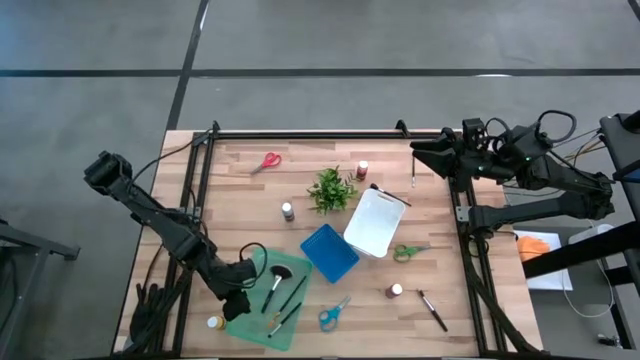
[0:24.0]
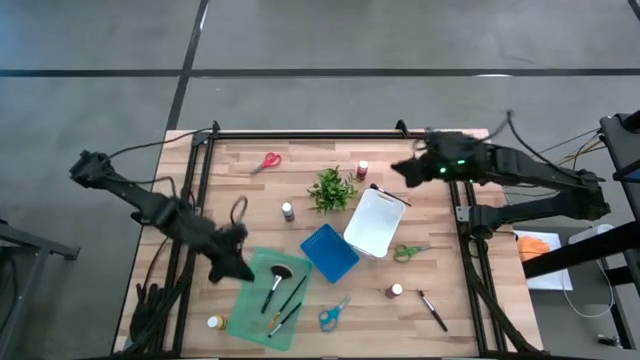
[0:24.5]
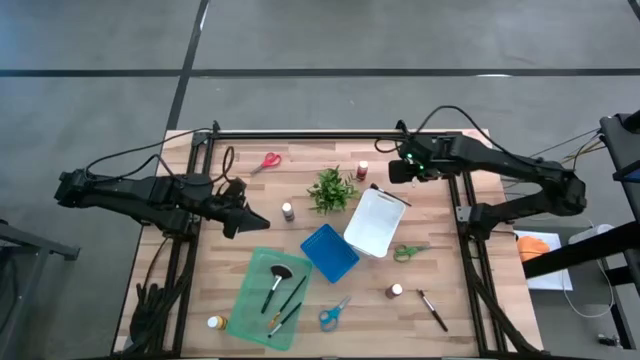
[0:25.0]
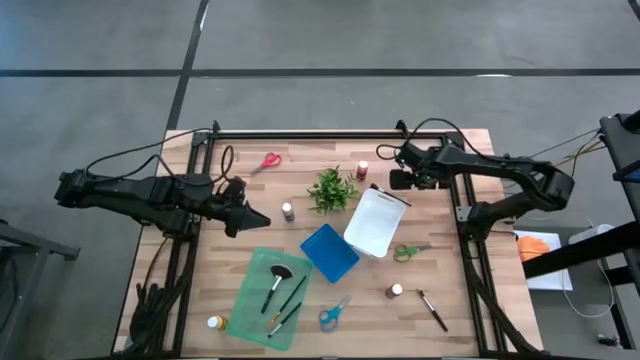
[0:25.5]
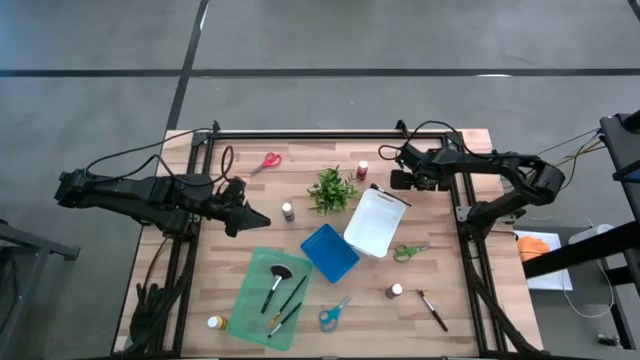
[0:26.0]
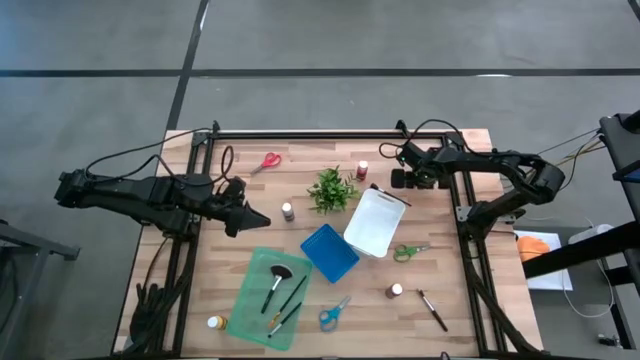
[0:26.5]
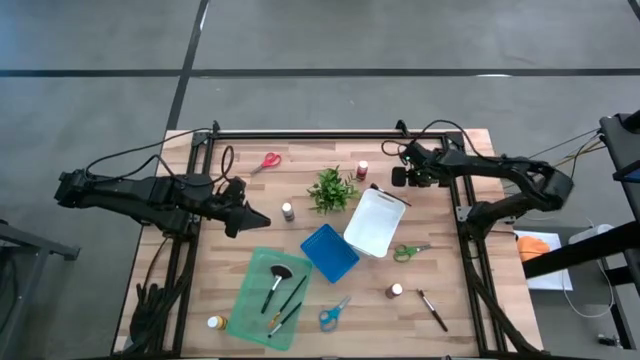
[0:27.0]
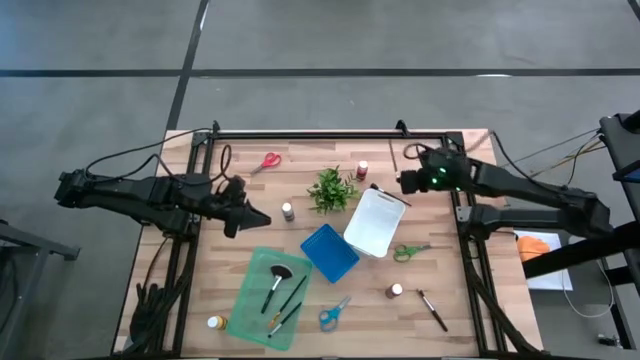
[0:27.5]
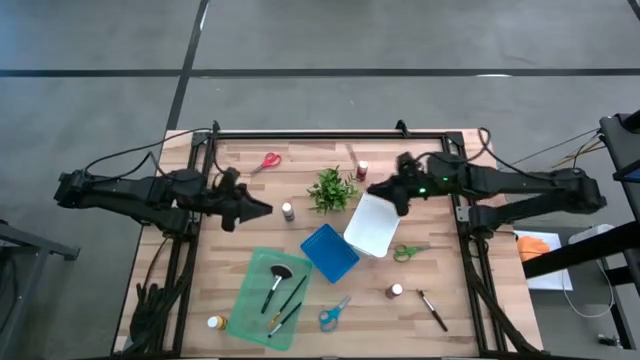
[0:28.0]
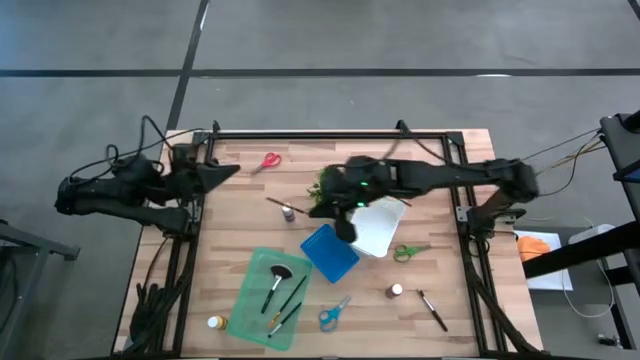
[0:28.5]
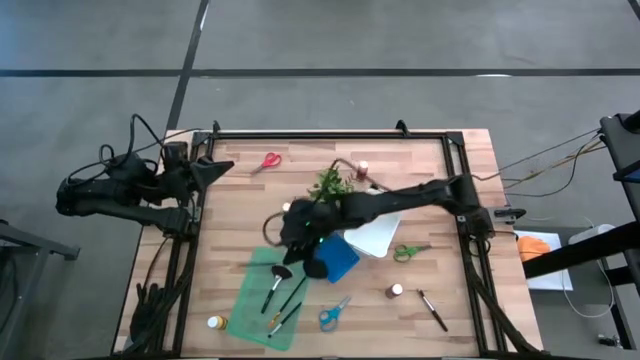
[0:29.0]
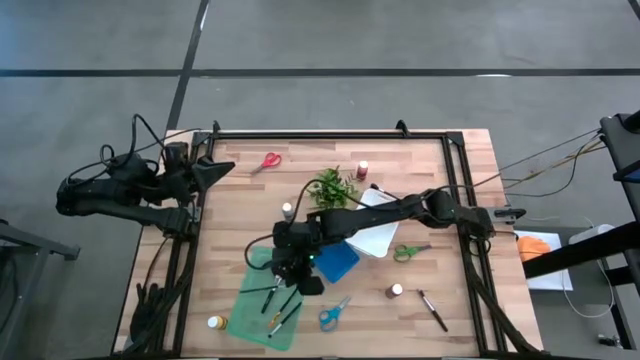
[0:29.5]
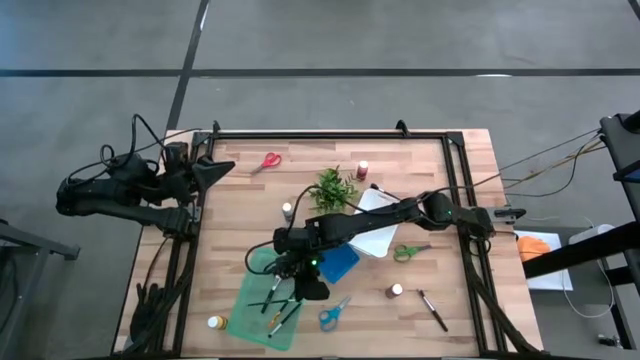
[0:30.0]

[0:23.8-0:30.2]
Task: Pick & Place Paint Supplies
Put the black eyeshadow brush into the green bin

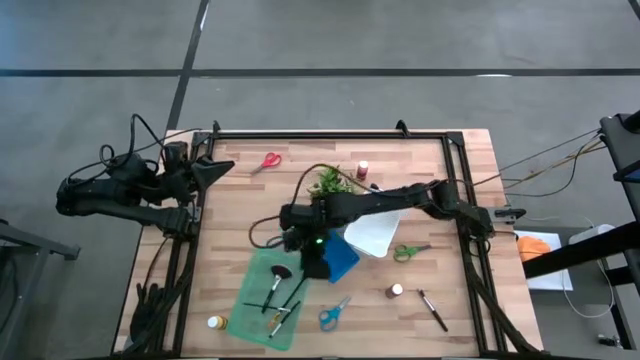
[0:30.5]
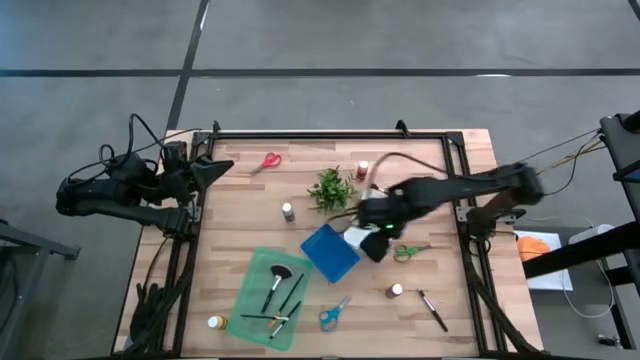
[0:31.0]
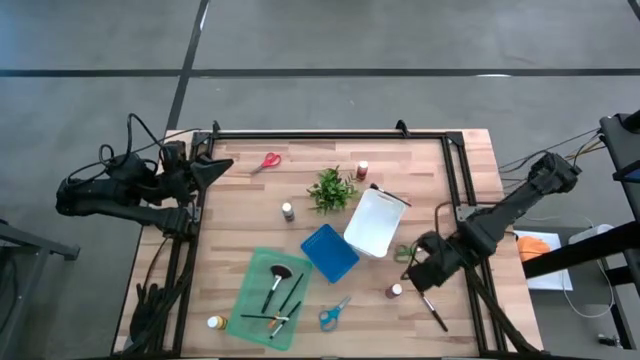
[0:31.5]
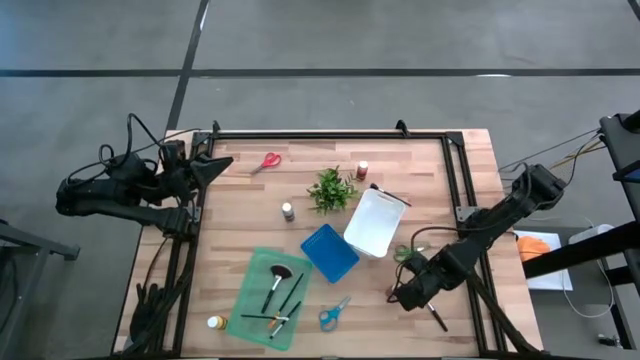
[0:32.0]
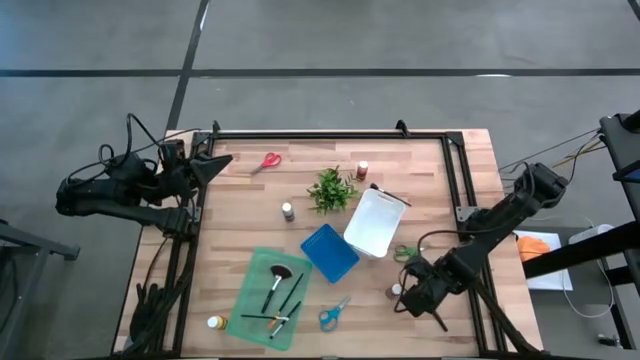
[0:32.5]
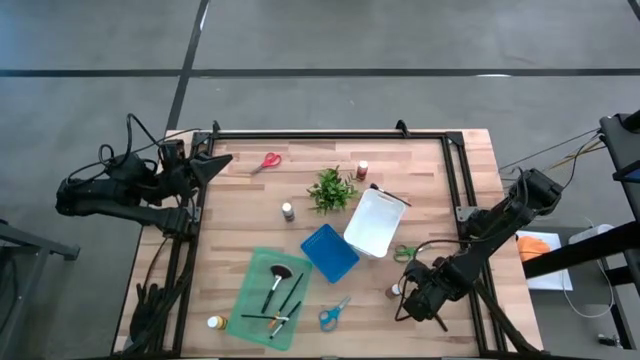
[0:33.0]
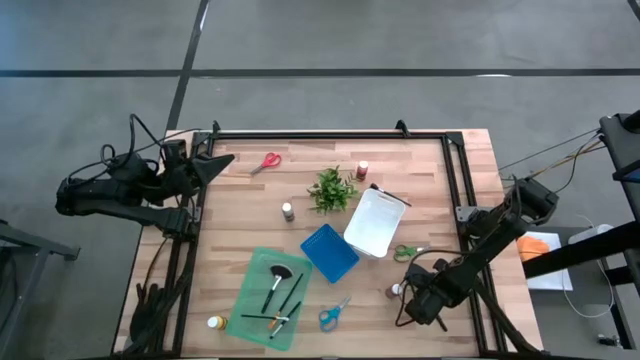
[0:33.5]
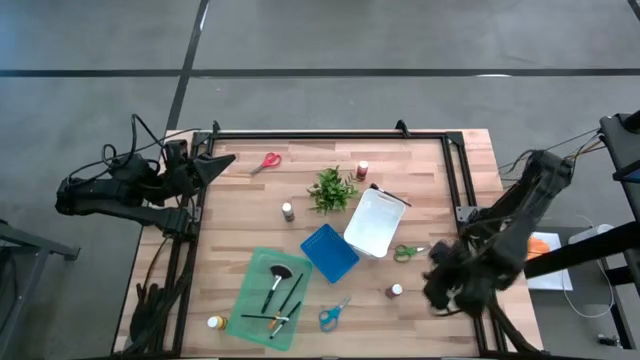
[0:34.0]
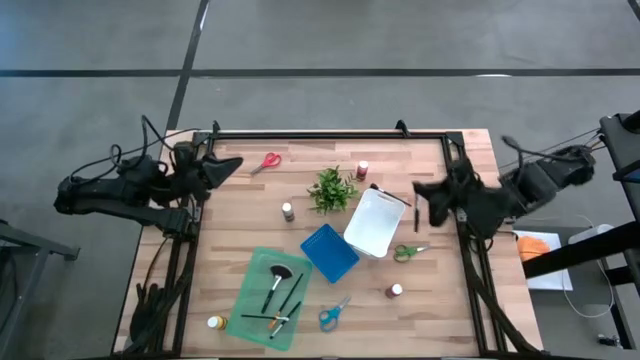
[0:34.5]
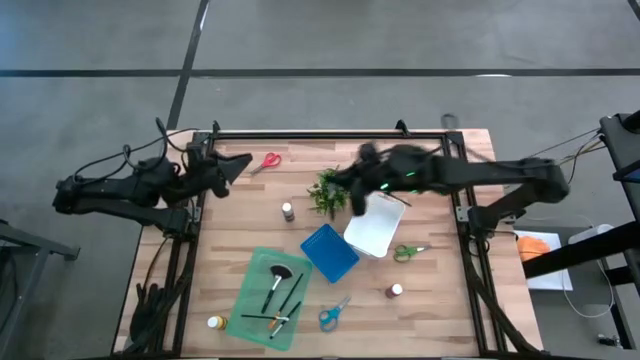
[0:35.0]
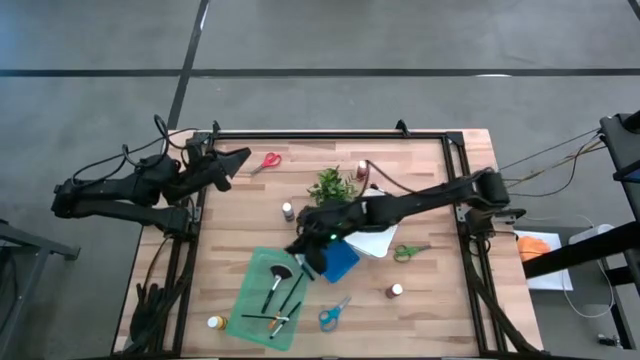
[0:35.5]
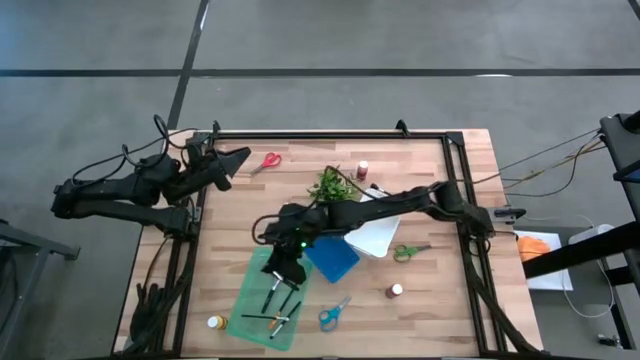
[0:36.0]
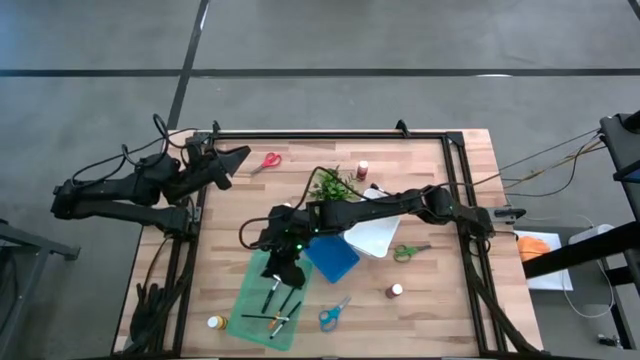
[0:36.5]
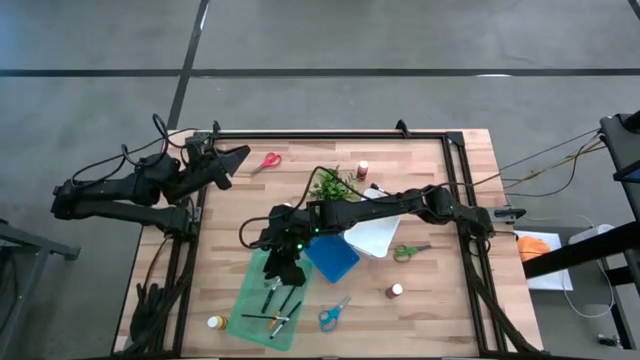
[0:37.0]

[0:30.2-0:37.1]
Put the black powder brush into the green bin

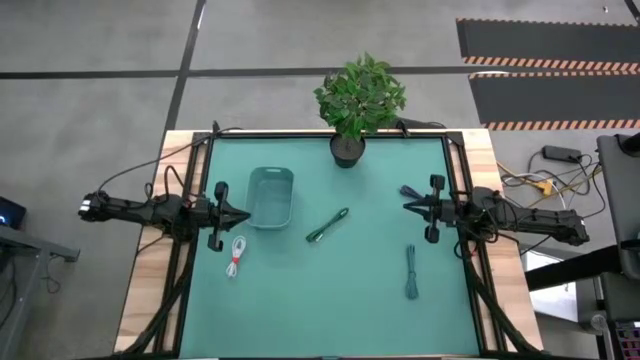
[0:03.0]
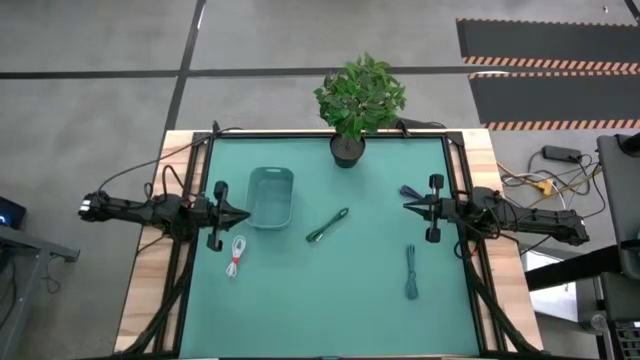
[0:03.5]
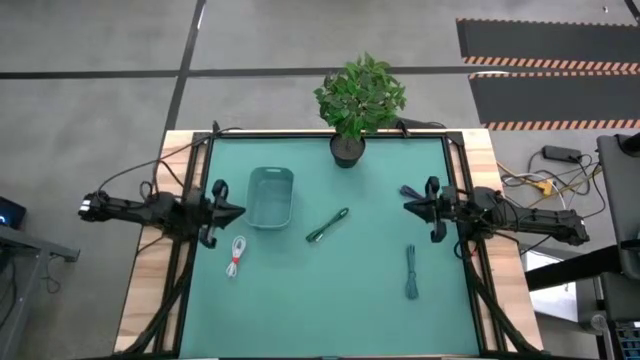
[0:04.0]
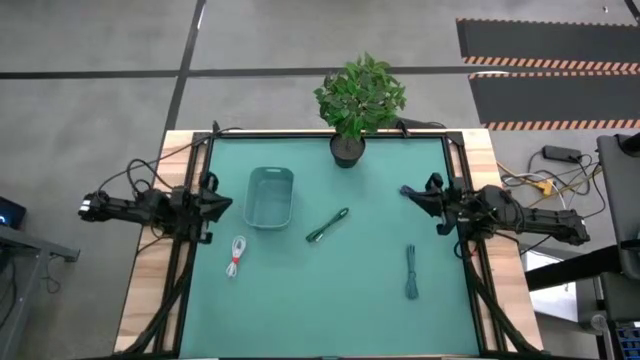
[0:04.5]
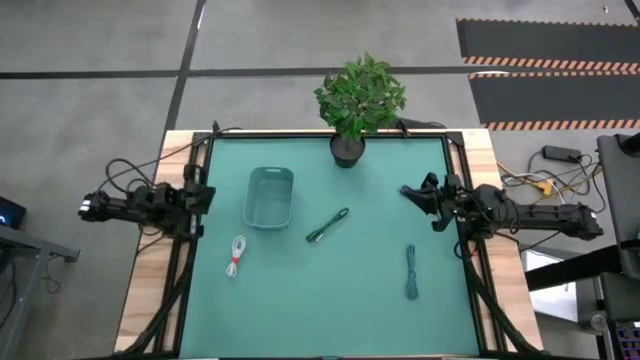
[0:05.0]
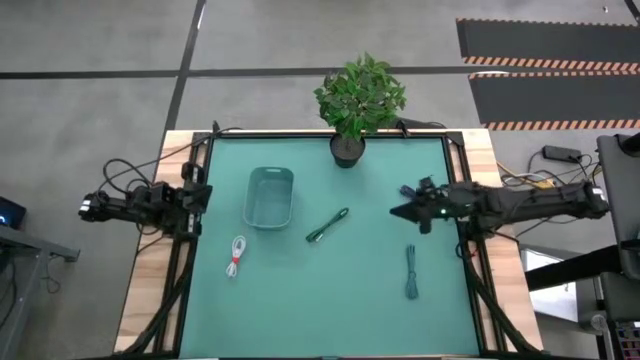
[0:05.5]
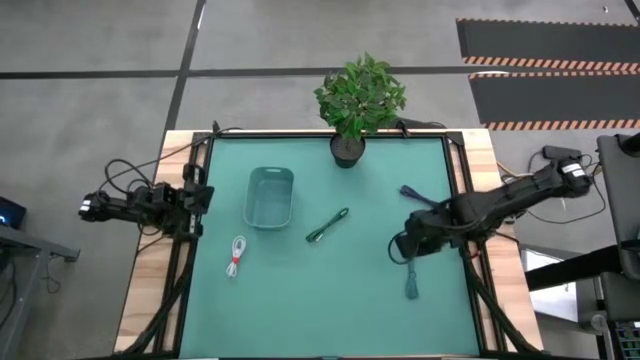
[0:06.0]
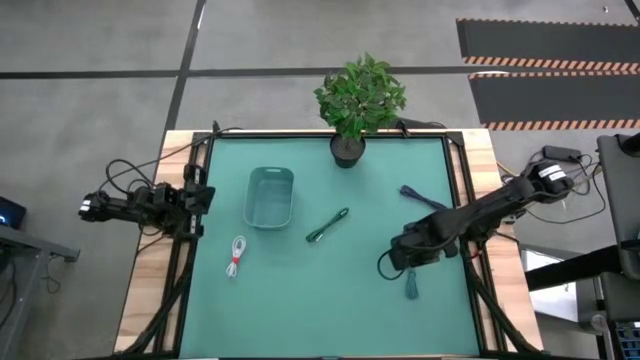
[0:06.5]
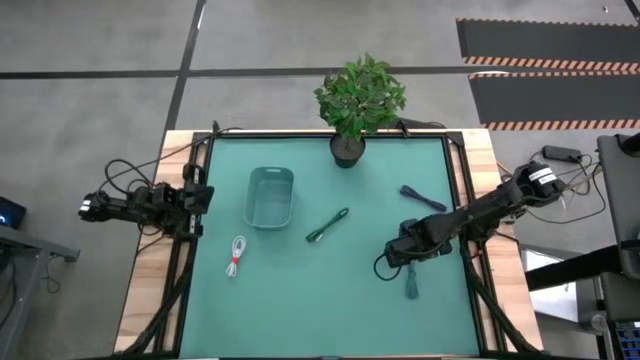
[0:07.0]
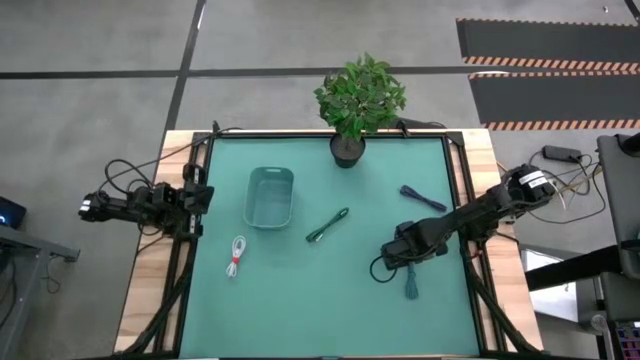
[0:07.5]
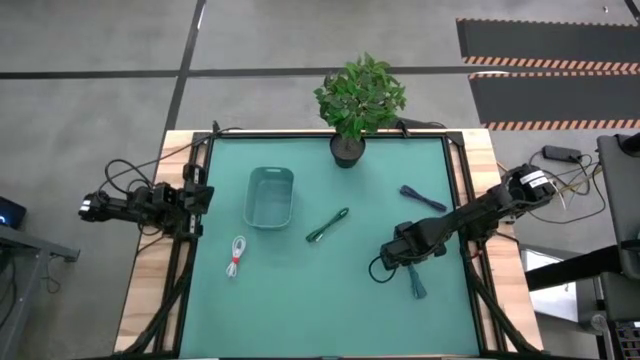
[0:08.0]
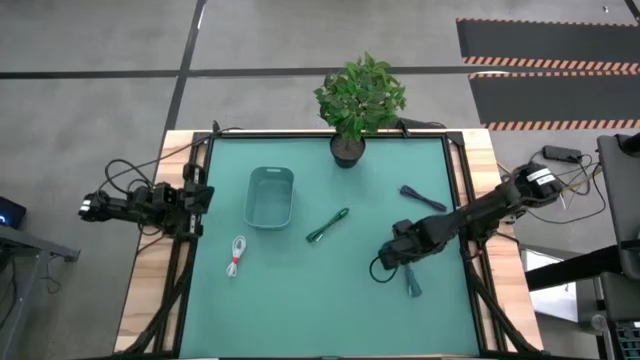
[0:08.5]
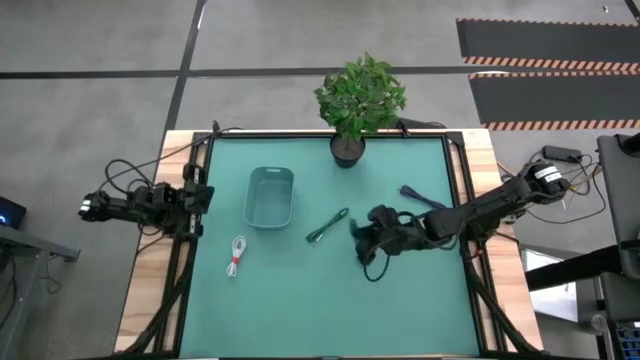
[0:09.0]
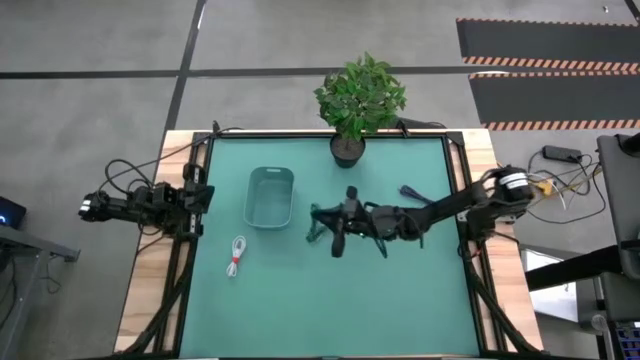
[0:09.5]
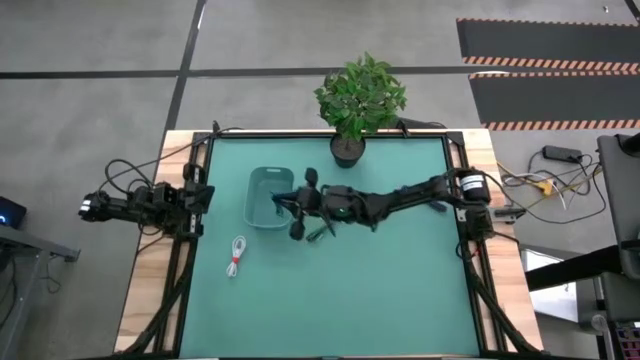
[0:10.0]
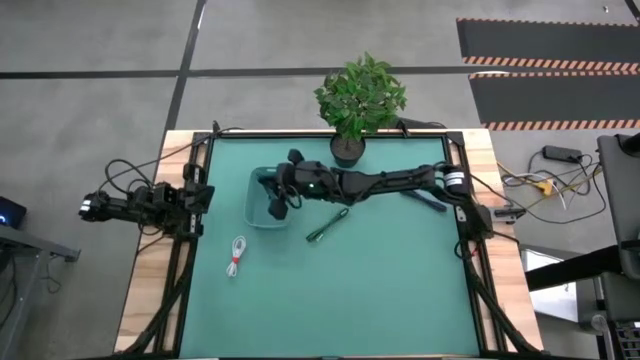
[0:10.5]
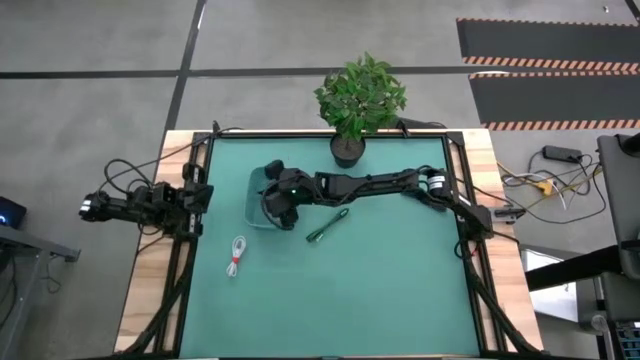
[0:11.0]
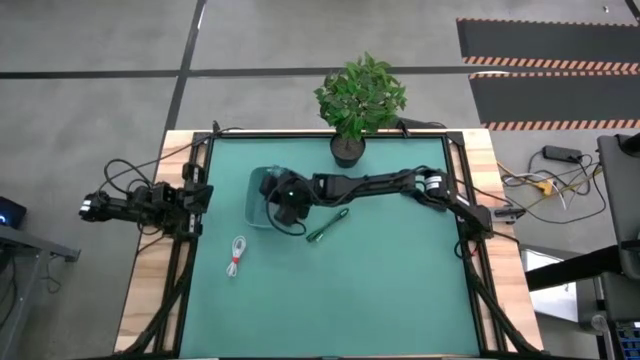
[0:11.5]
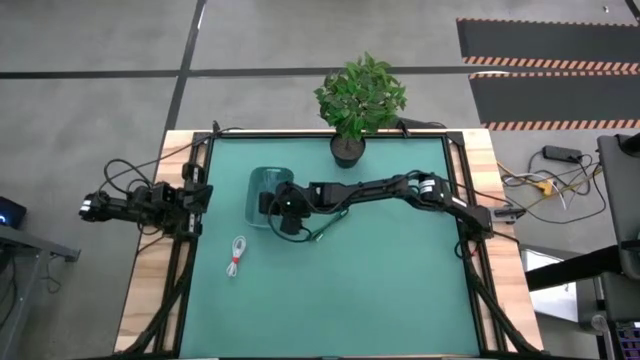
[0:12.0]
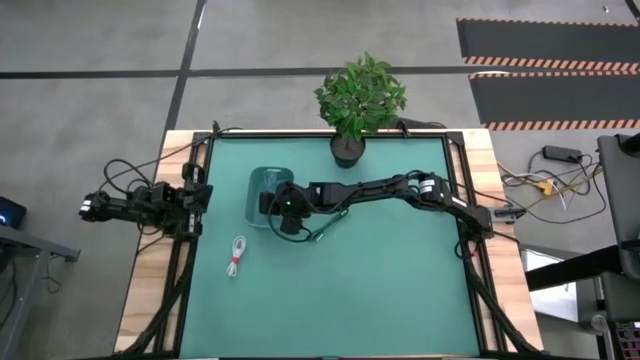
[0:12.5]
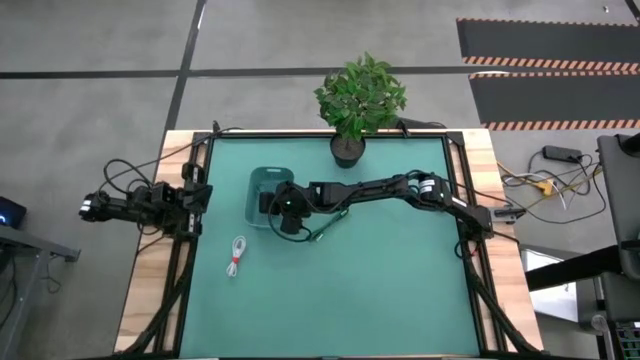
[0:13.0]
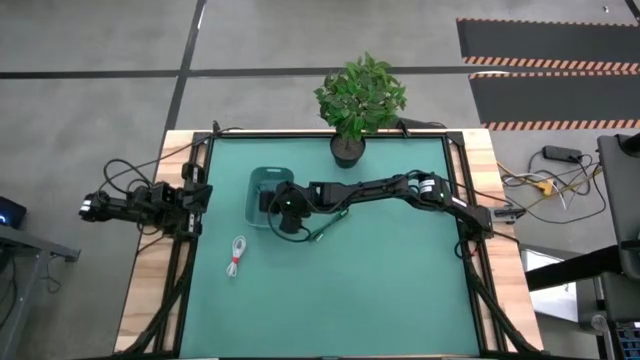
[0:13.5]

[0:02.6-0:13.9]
Task: Pick and place USB-C Cables
Put the black blue charger cable into the green bin
